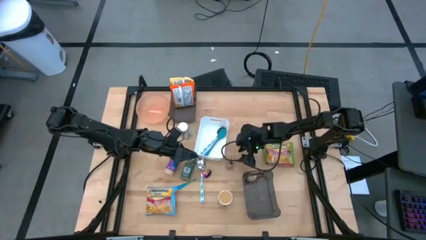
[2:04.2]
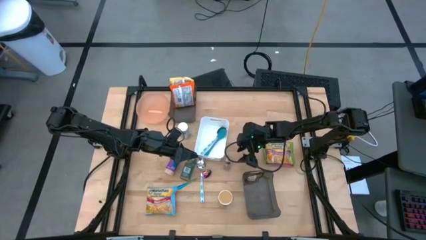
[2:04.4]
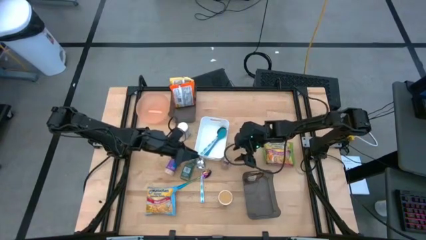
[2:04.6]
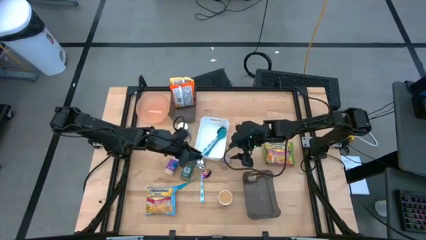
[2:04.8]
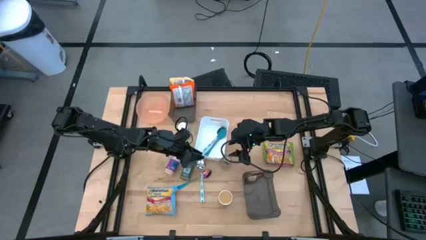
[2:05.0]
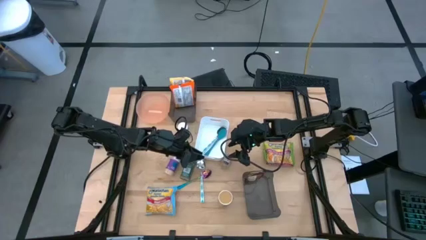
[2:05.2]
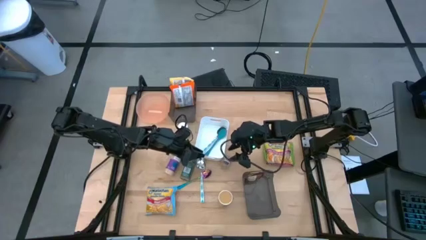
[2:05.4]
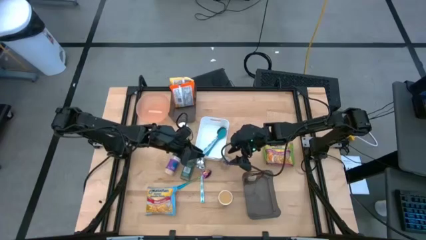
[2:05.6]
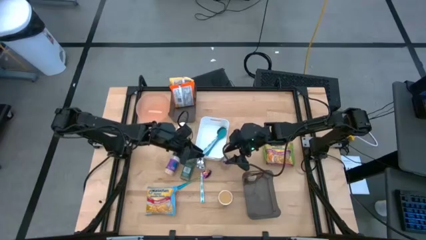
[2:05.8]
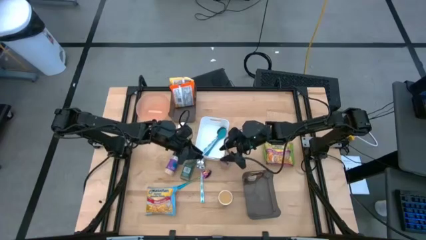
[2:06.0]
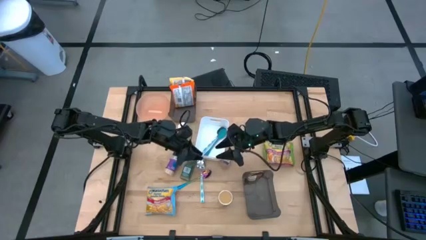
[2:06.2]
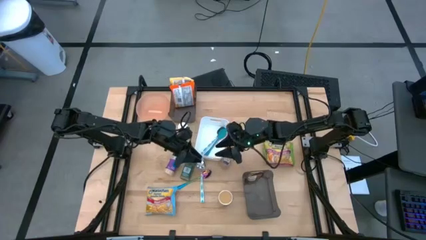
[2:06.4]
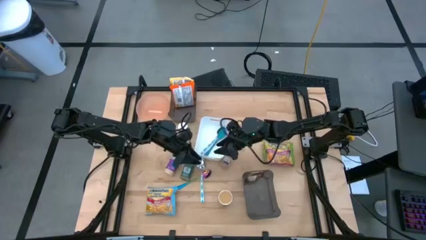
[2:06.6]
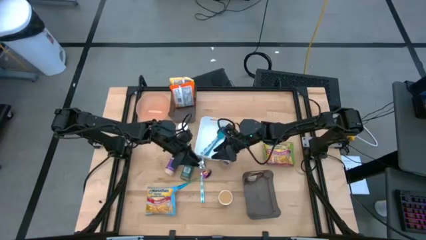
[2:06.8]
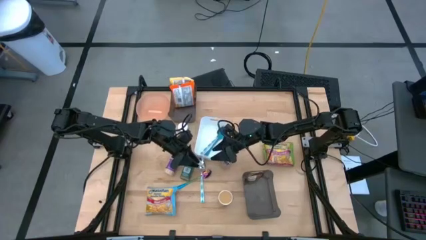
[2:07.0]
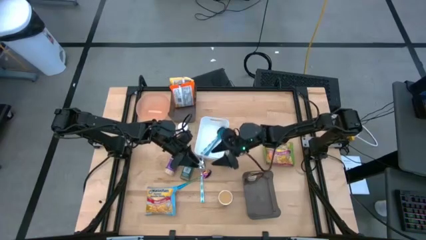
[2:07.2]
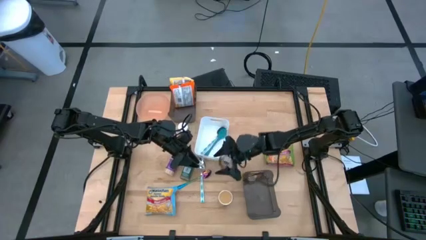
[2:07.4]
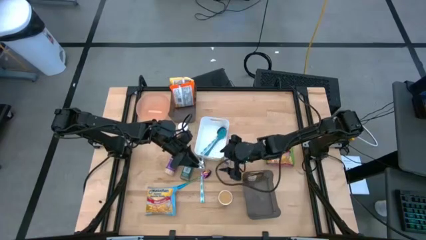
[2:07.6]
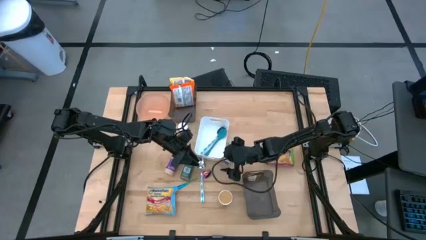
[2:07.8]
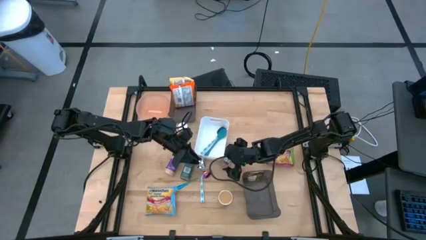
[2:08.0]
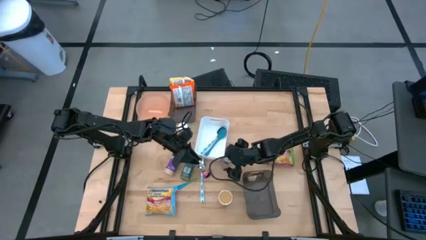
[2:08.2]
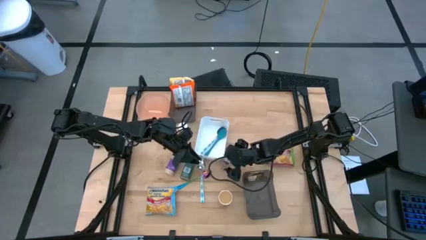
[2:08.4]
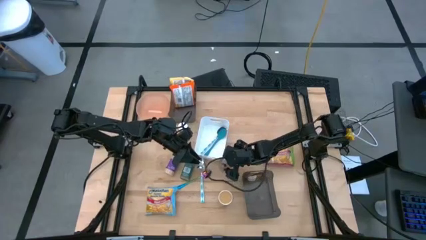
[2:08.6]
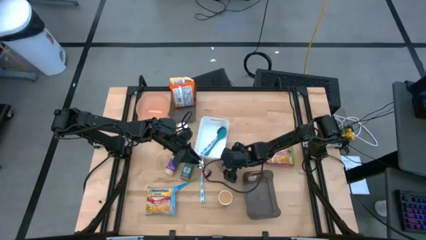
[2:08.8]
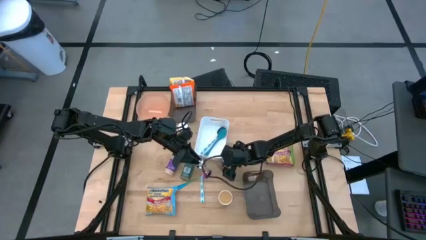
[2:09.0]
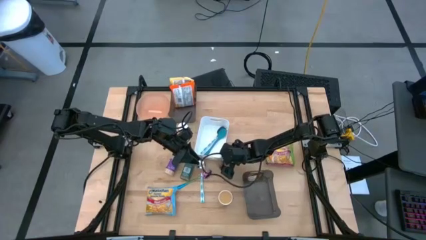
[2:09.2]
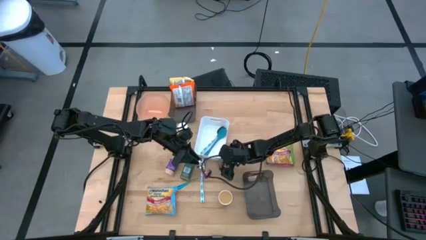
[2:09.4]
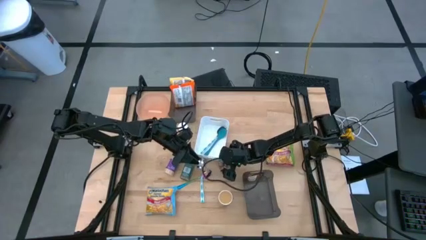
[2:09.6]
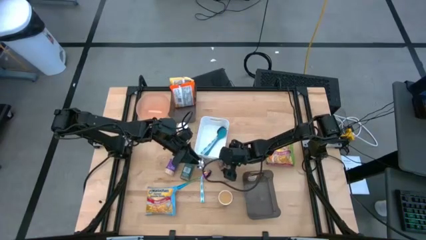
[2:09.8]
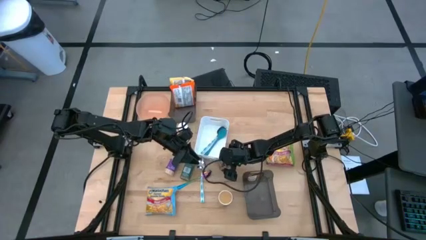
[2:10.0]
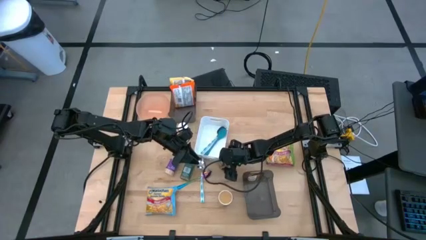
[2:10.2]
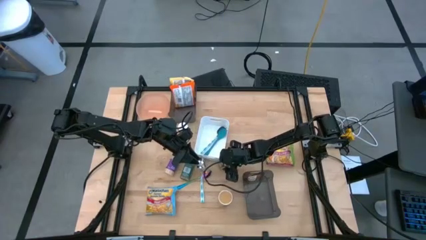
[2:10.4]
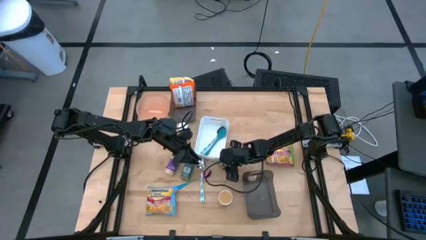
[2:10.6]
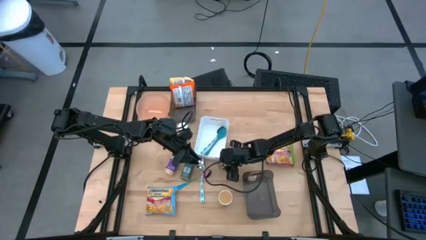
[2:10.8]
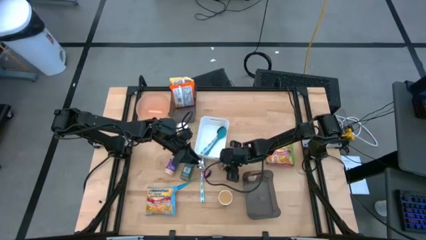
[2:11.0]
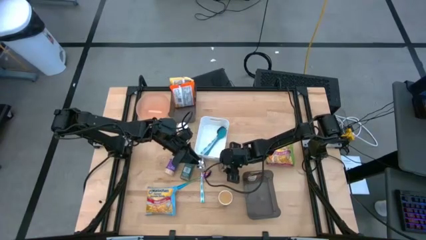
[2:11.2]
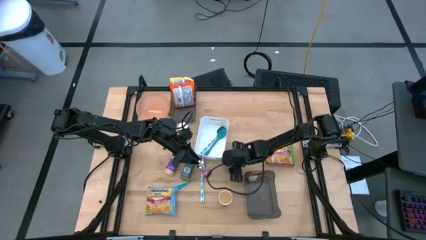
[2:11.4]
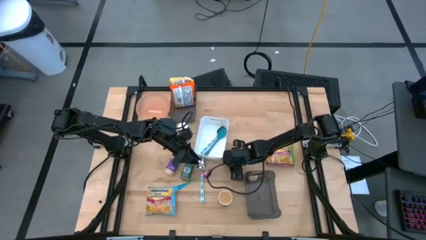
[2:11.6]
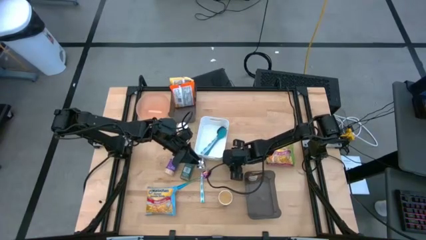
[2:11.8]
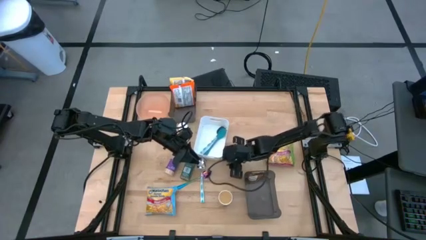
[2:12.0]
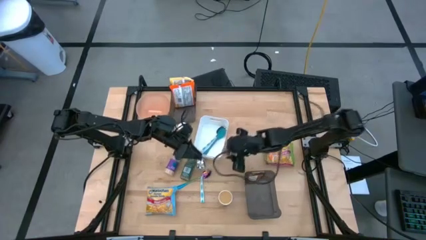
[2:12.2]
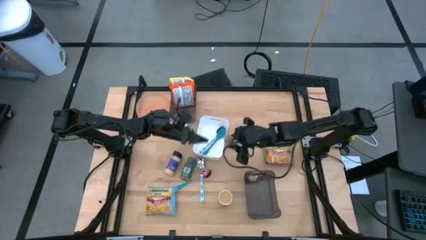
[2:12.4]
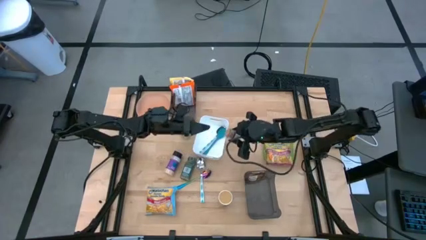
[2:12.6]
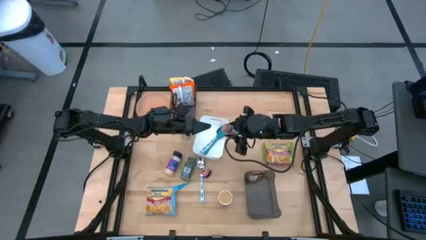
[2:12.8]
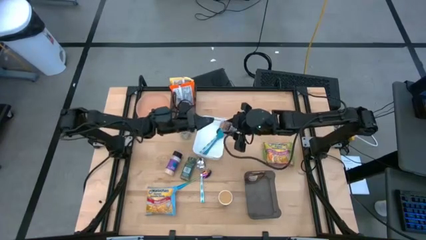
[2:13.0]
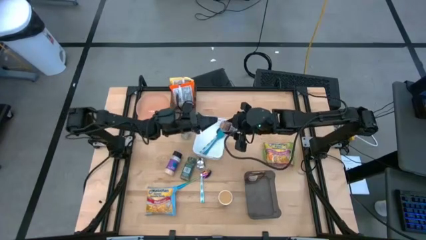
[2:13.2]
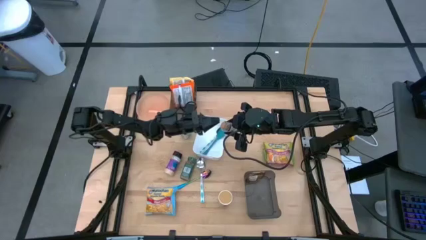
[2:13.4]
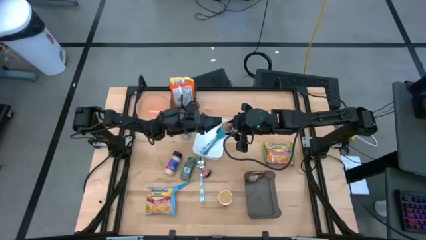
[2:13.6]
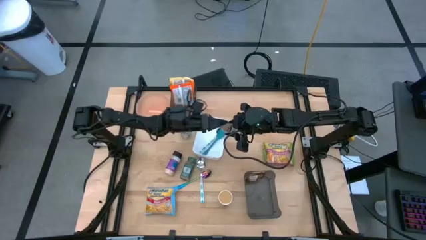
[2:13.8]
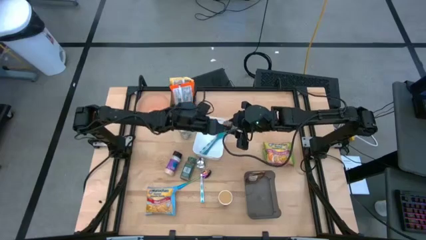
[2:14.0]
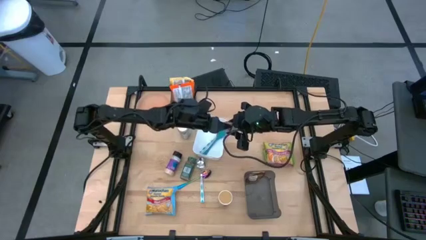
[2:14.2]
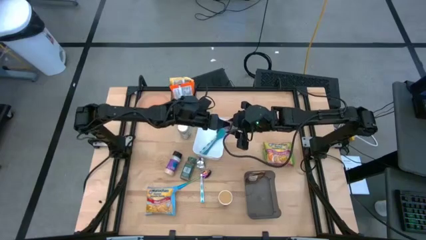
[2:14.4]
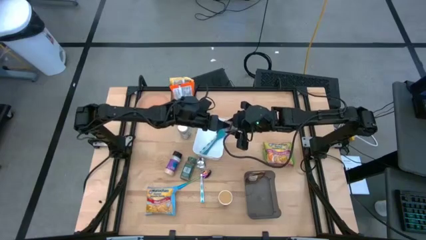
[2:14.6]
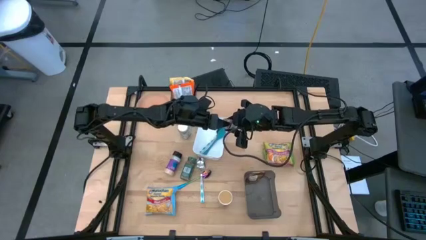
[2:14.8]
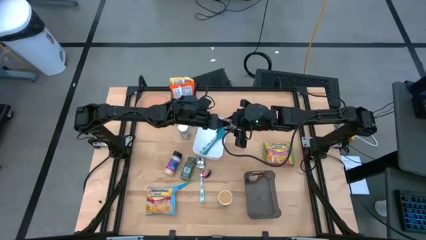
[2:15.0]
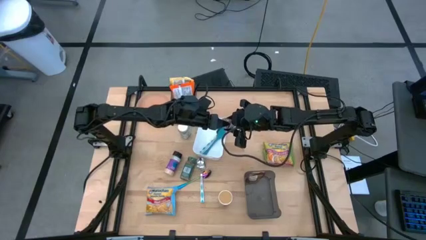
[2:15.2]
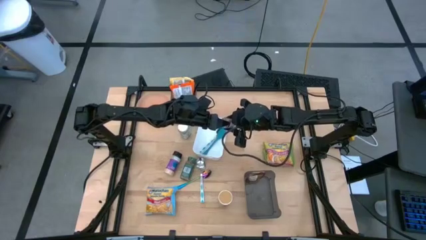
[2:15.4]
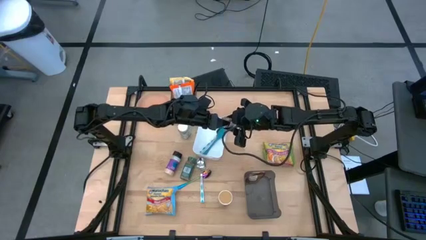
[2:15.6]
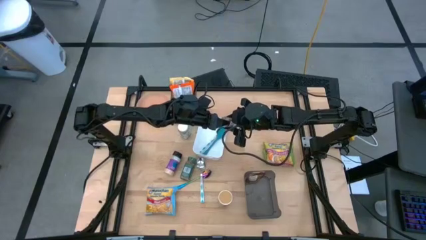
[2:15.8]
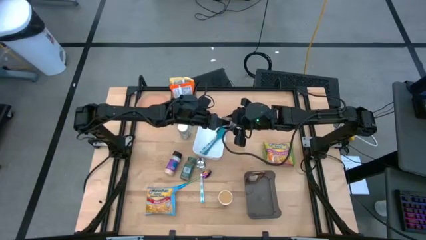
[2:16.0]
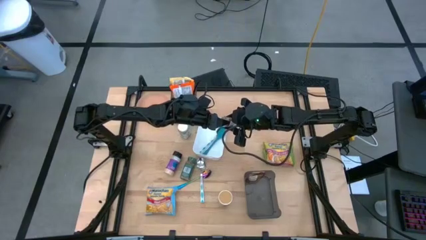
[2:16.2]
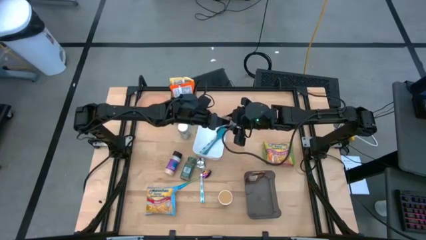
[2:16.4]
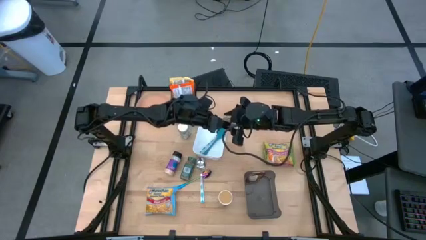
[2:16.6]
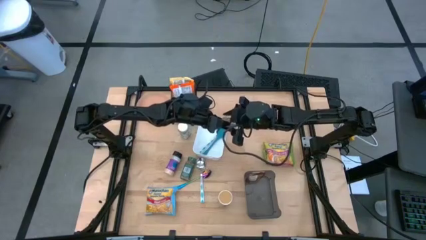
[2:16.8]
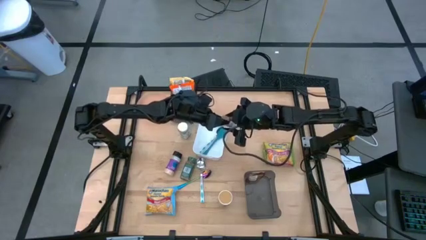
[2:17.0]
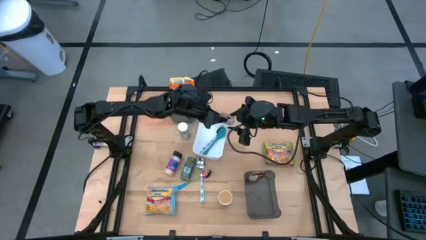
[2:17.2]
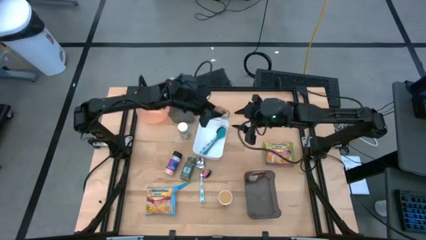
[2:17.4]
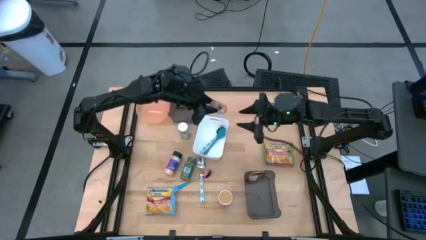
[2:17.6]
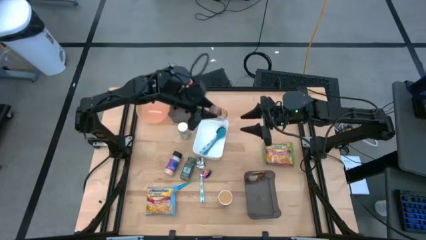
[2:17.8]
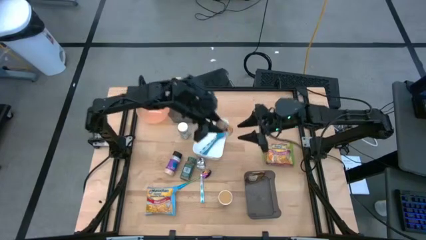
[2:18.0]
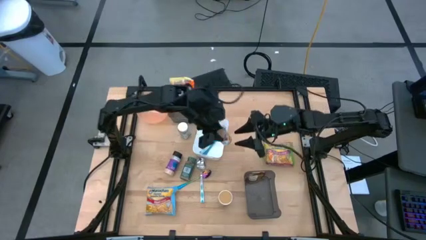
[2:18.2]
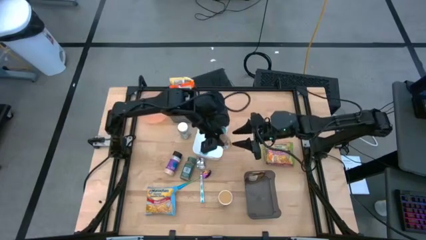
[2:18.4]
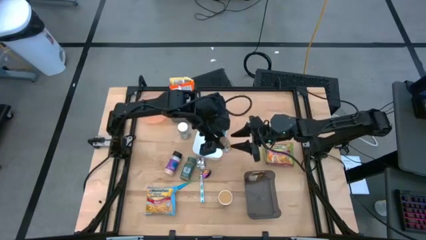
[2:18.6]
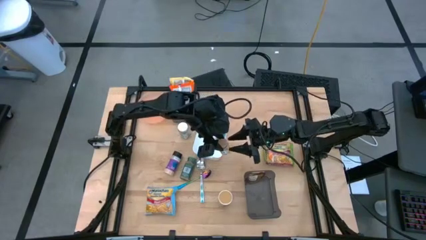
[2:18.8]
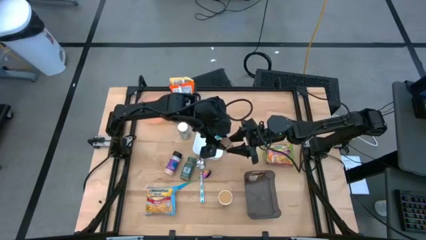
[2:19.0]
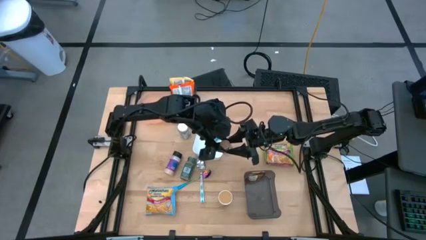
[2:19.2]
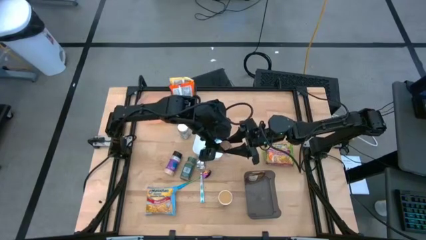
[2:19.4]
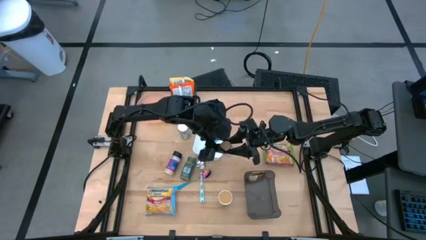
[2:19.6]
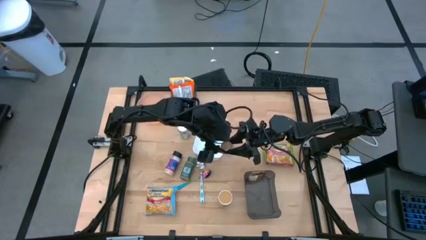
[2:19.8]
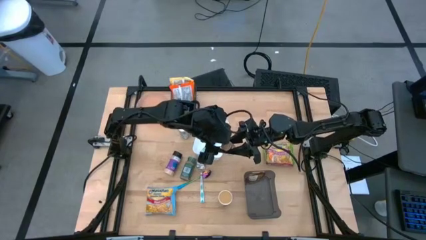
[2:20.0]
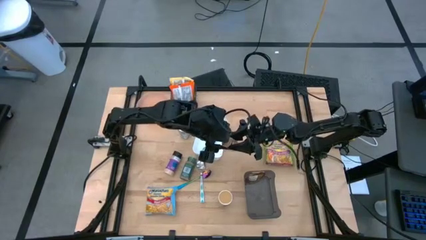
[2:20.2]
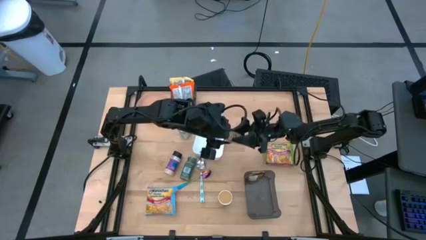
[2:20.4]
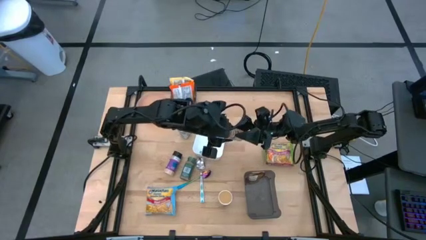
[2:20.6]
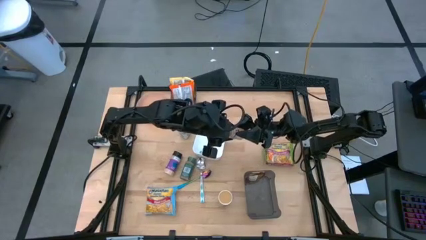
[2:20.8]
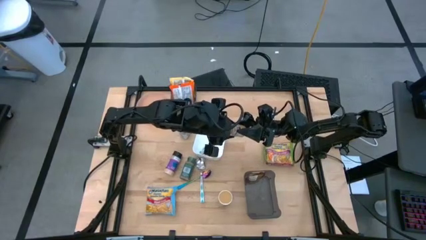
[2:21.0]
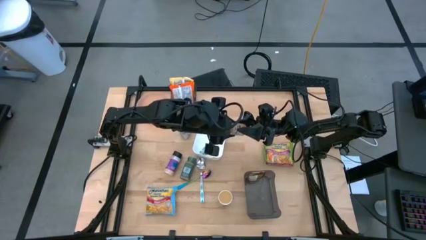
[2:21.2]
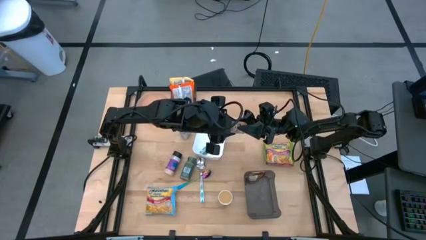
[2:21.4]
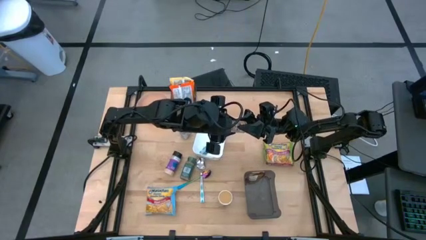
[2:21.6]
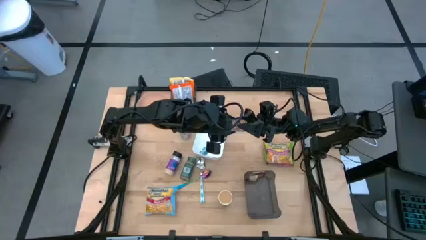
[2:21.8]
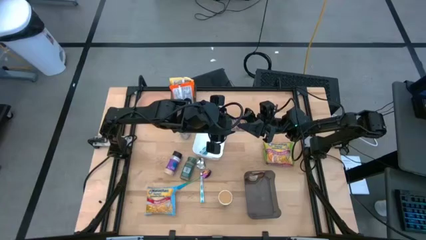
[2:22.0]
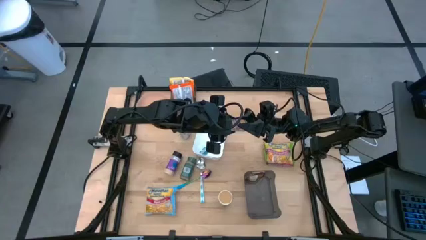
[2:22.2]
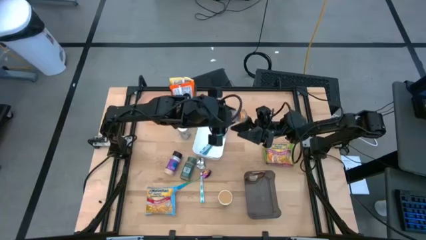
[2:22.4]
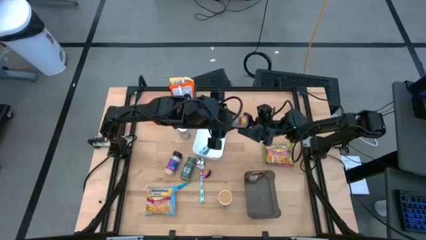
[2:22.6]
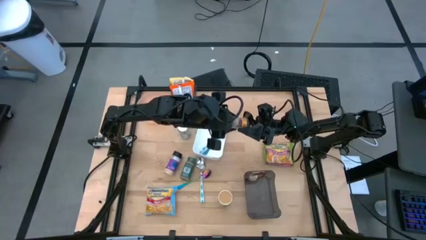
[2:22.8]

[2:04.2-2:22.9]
Task: Pick & Place Food Item
Put the brown seasoning bottle into the bottom black bin
